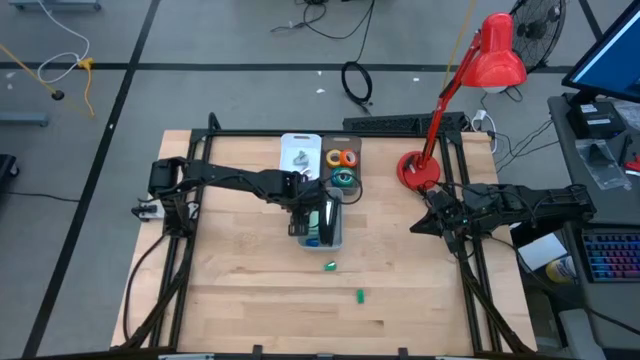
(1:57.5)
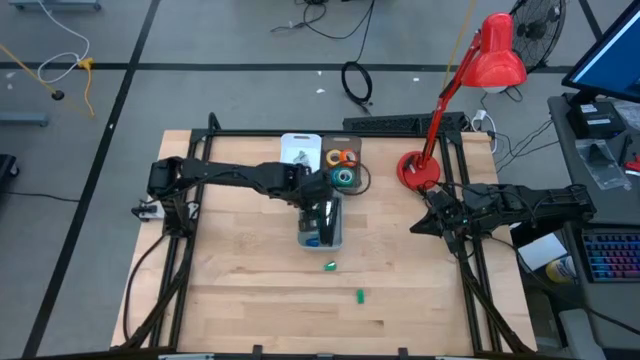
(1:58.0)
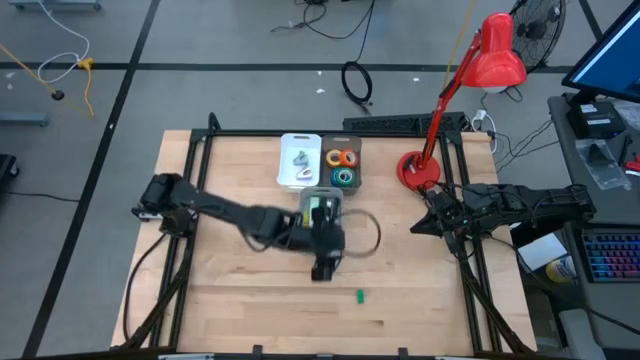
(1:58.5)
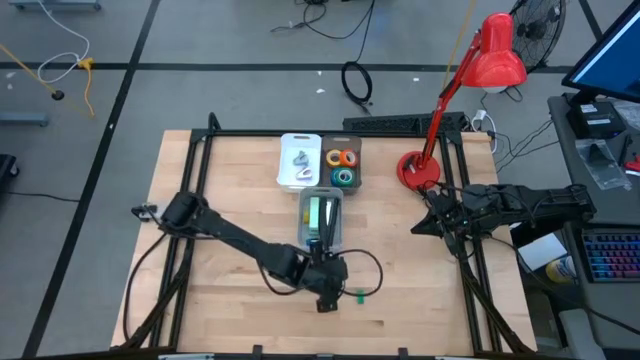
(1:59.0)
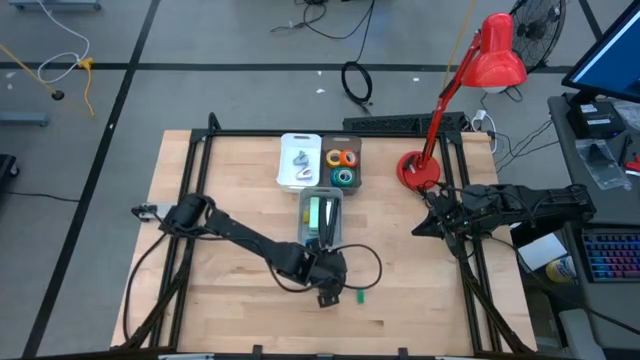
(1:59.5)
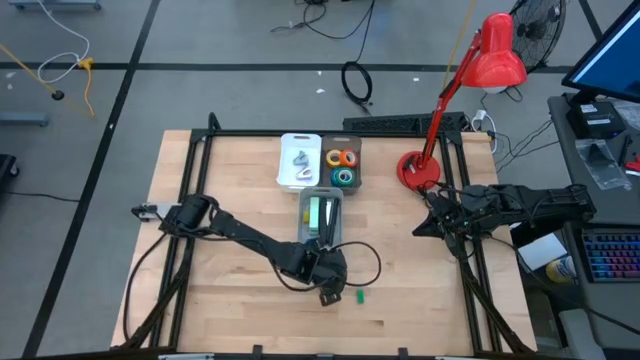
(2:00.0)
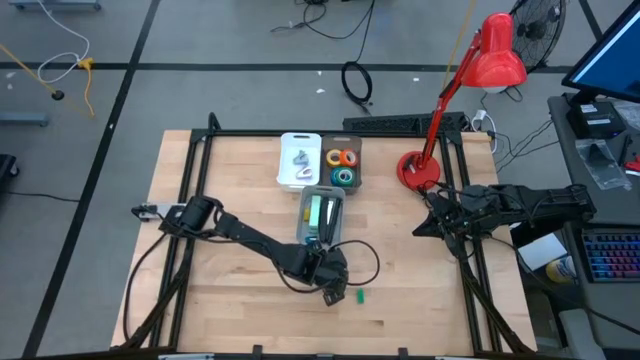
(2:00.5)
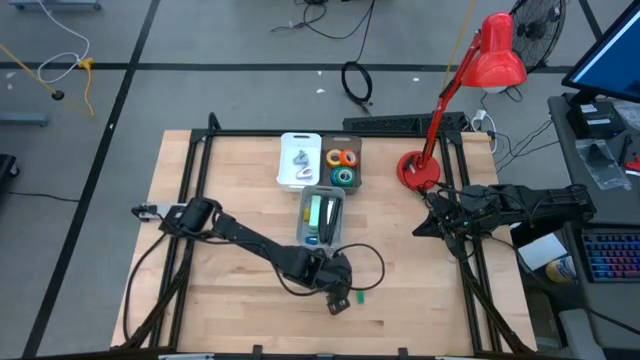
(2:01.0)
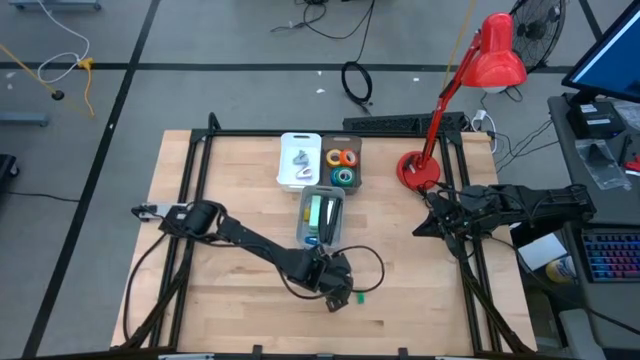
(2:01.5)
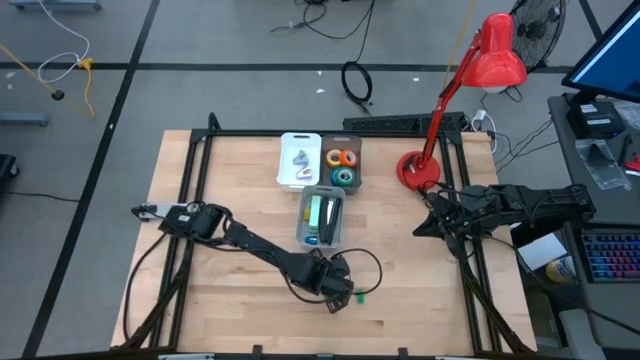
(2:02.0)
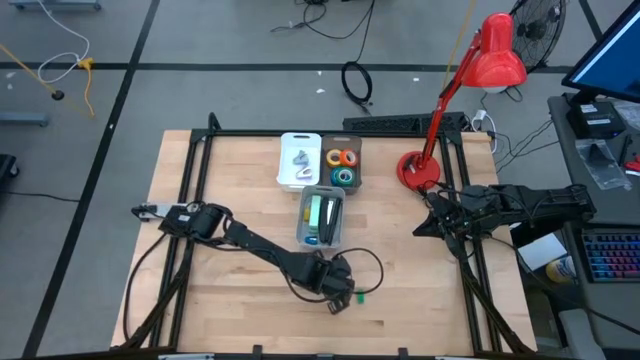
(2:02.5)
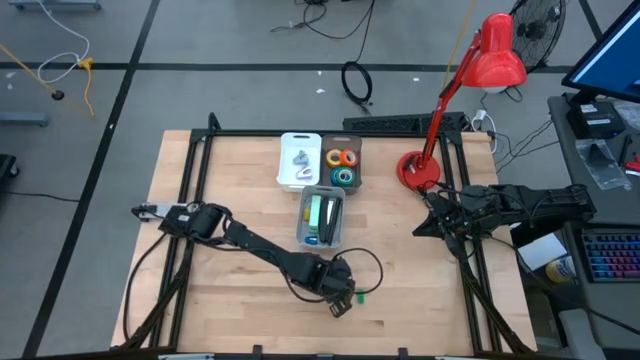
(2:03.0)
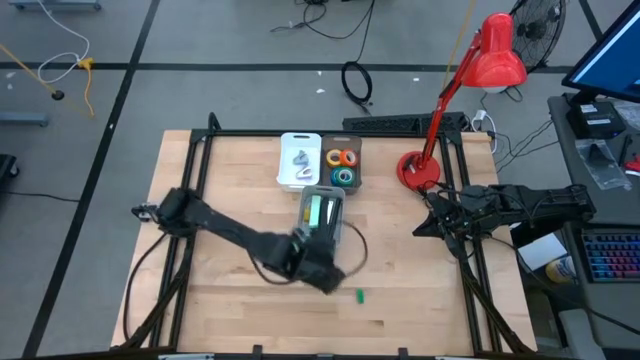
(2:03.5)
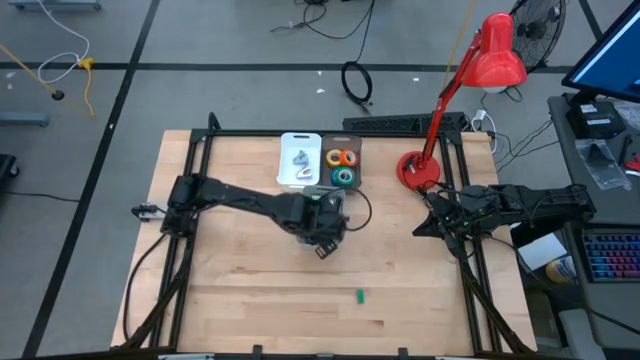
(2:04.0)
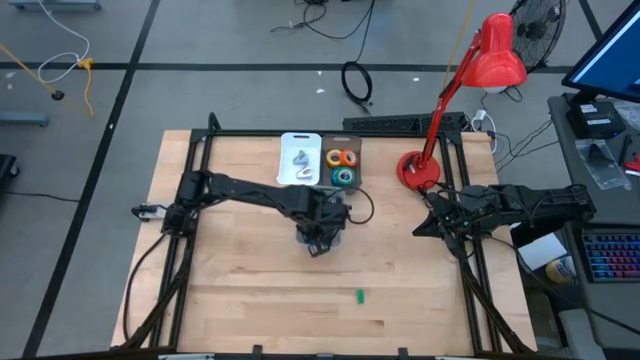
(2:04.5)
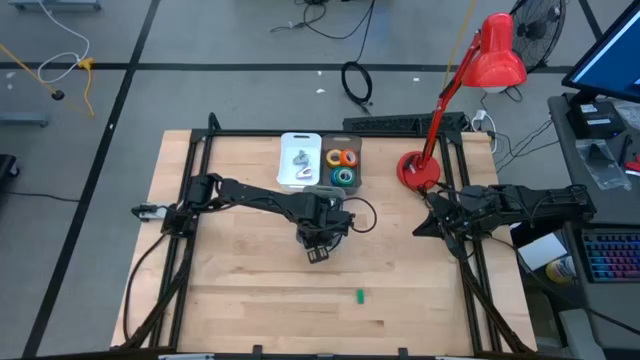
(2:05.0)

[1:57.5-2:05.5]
Task: Pick and place Stapler, Stapler remover, tape
Put the top green stapler into the gray bin

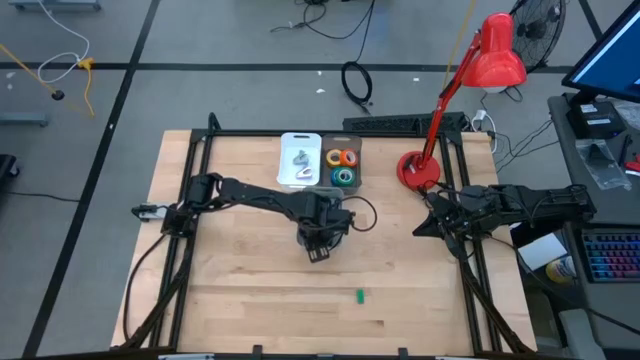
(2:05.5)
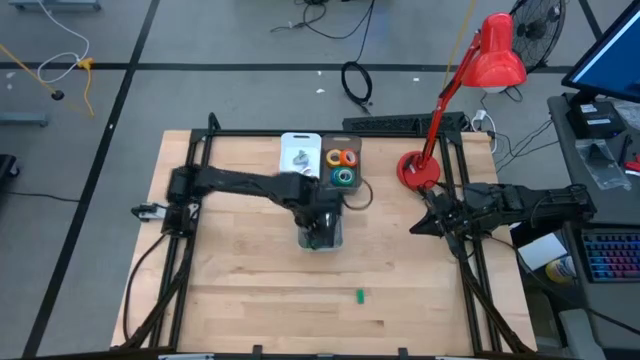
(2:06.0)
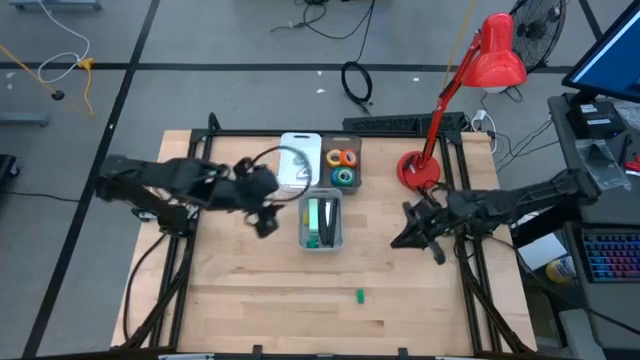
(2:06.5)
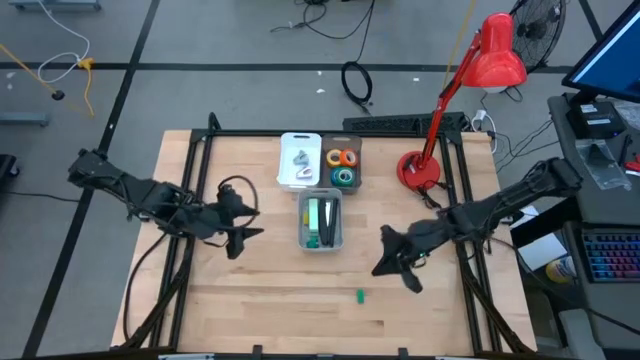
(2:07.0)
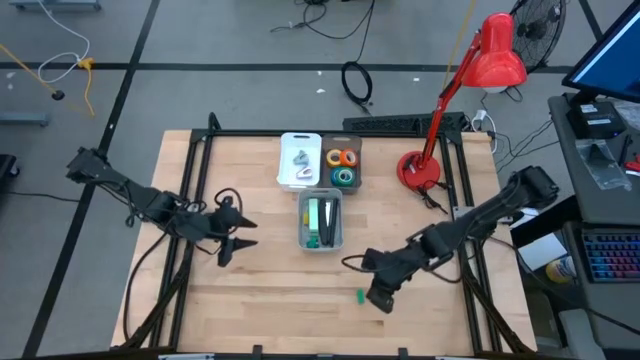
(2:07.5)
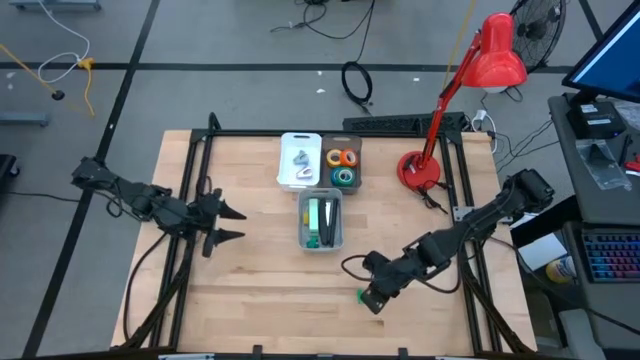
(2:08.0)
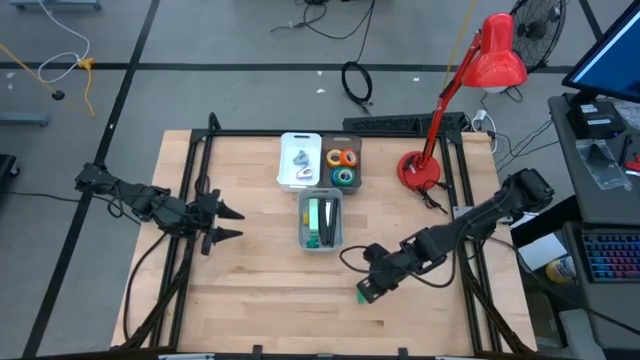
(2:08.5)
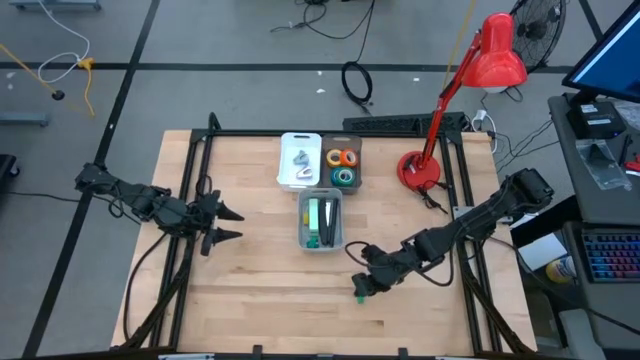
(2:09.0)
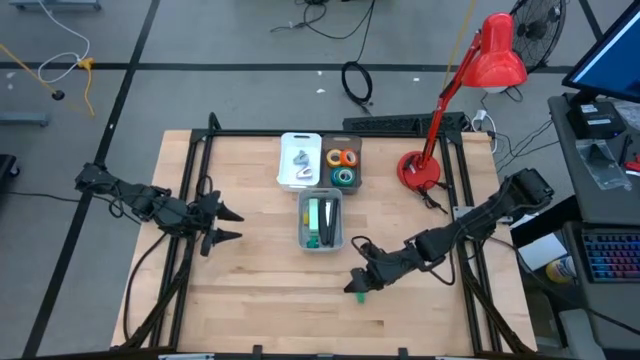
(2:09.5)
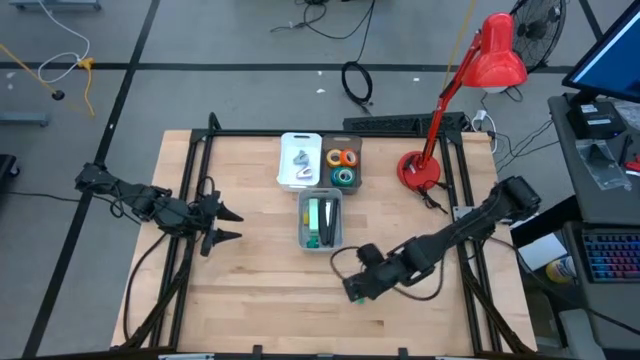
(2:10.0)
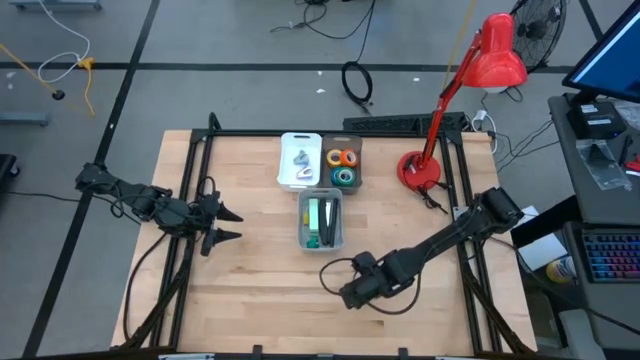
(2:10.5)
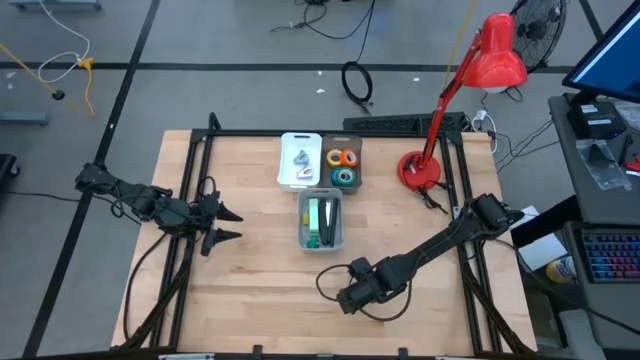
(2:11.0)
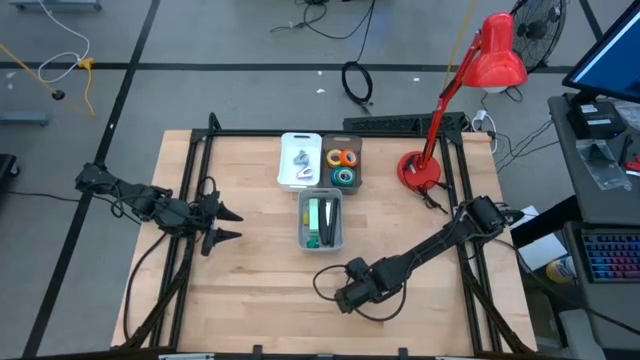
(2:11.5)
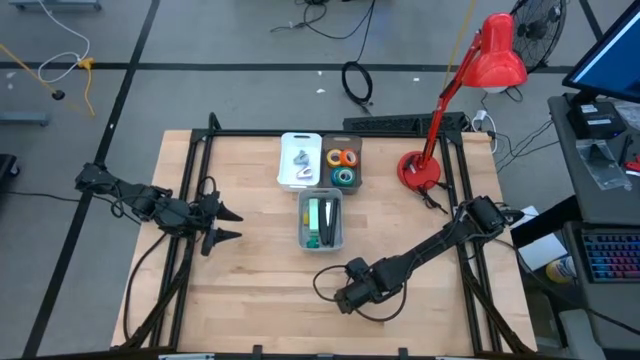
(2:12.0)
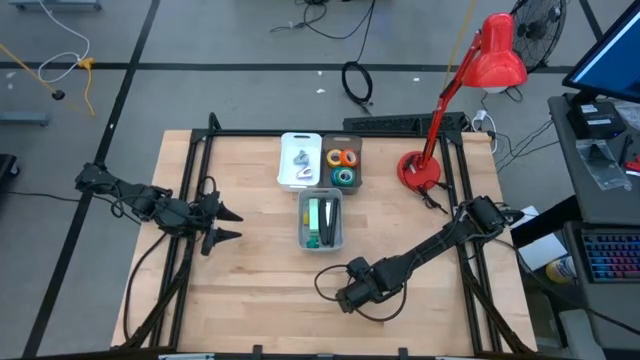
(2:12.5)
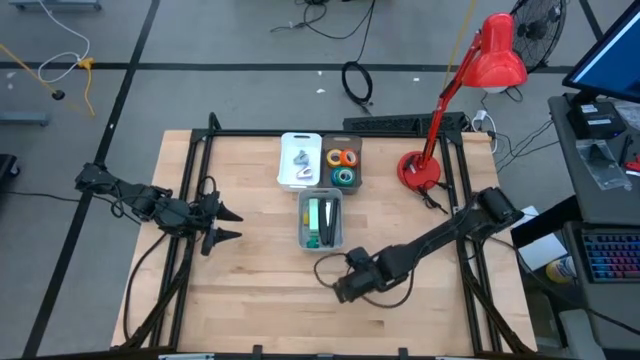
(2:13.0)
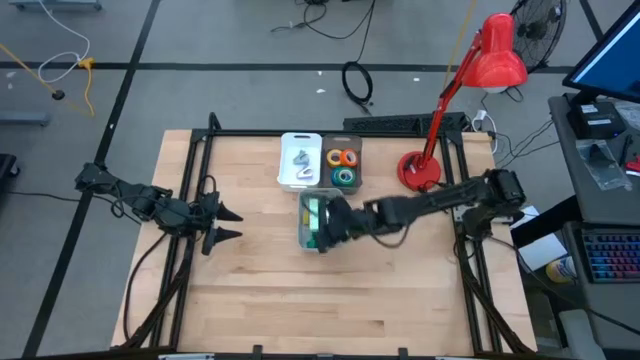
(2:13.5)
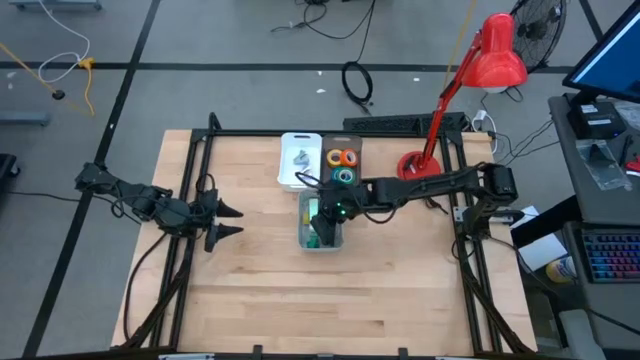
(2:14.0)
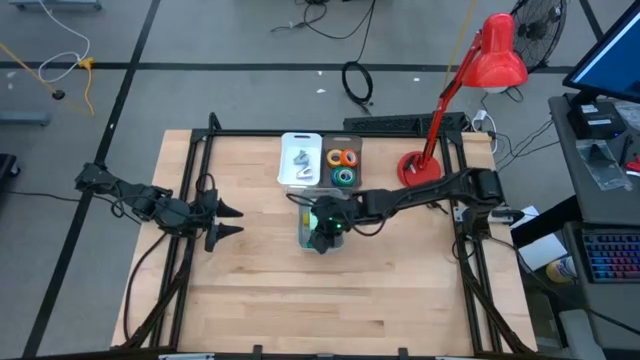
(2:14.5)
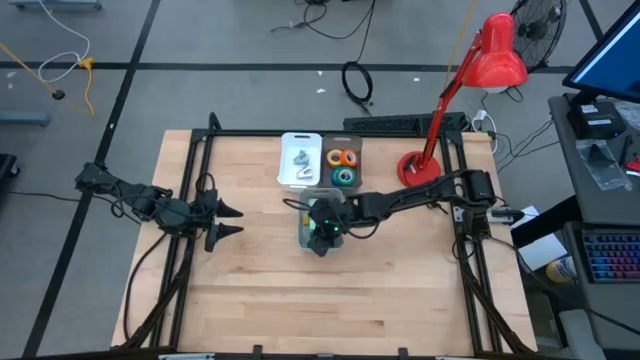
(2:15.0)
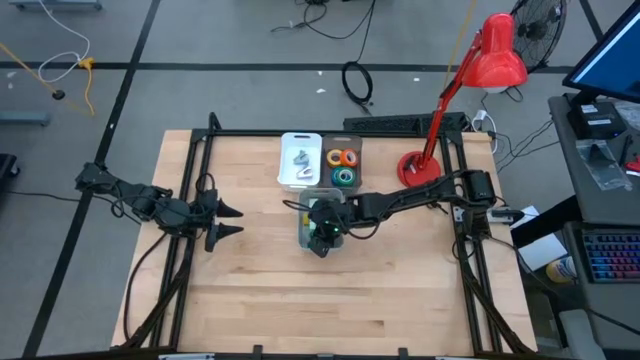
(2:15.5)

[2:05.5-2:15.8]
Put the green stapler into the gray bin

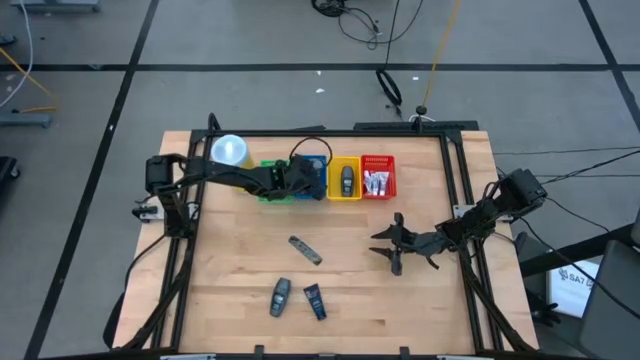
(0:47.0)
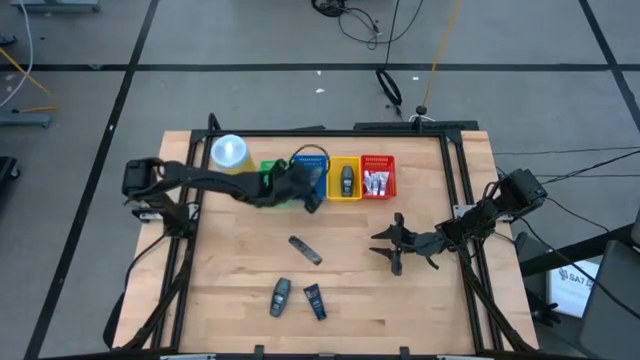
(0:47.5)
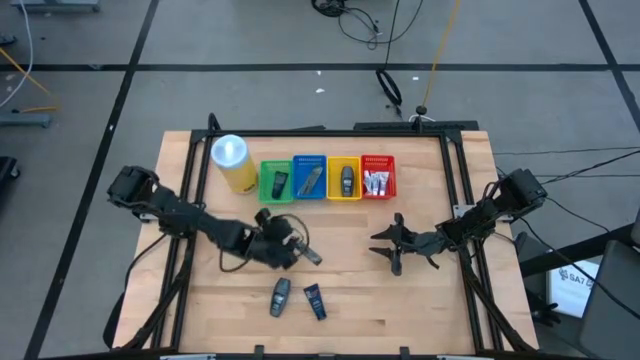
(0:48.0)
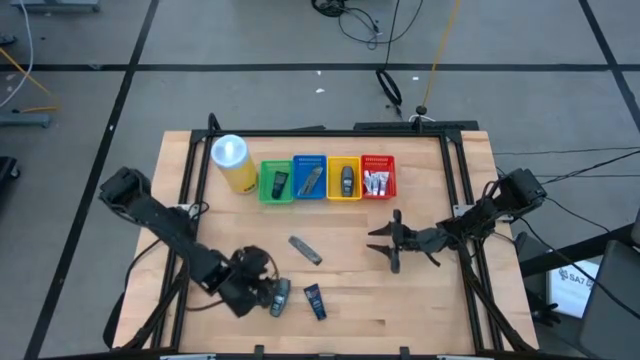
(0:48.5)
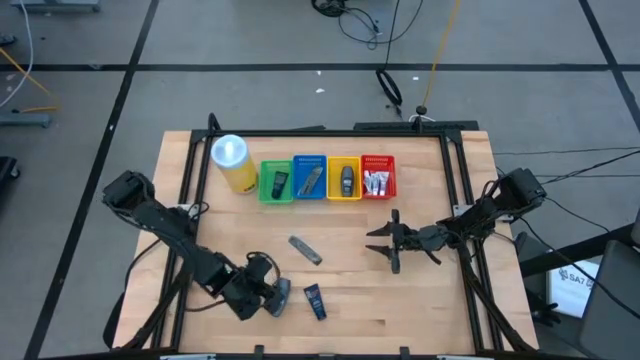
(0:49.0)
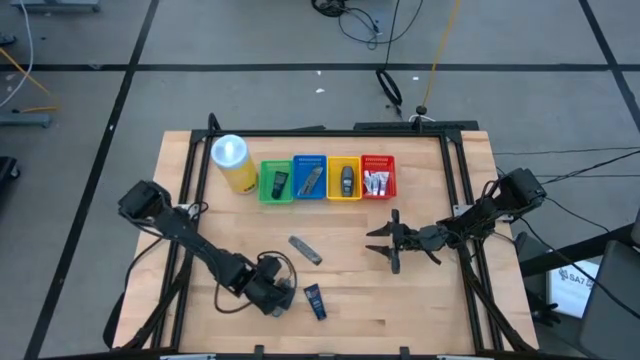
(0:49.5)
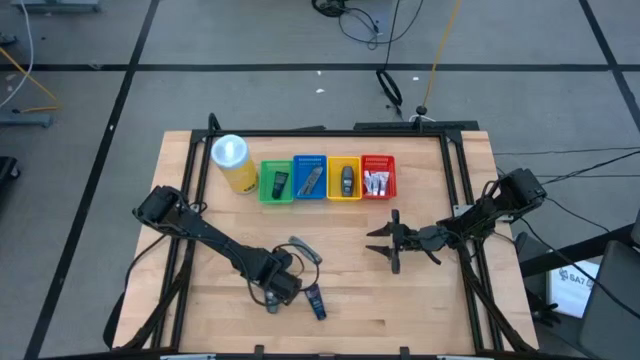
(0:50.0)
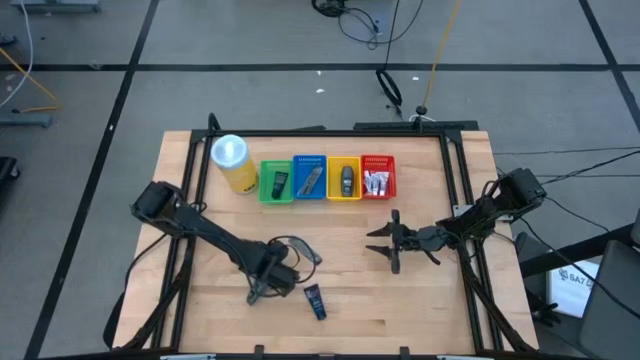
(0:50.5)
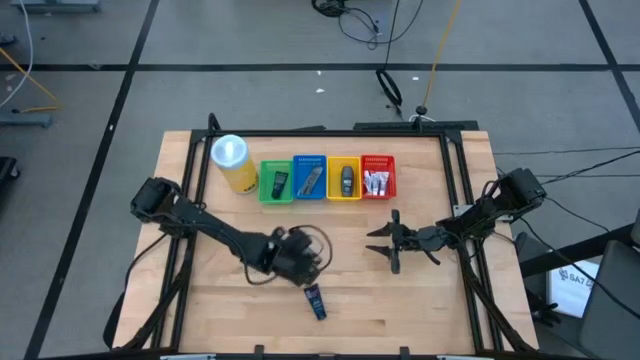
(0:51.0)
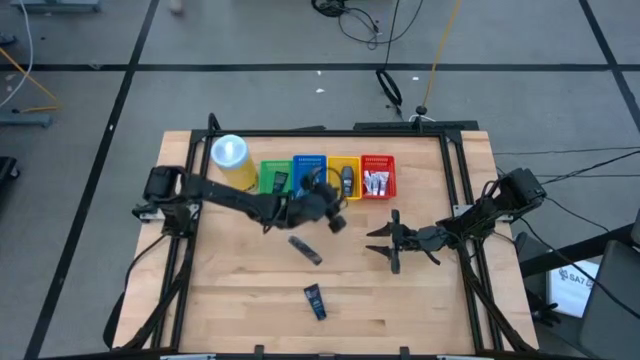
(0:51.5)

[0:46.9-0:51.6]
Task: Pick & Place Travel size toiletries
Put the deodorant into the yellow basket
